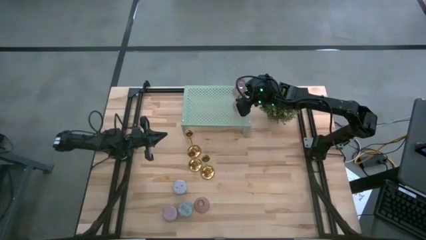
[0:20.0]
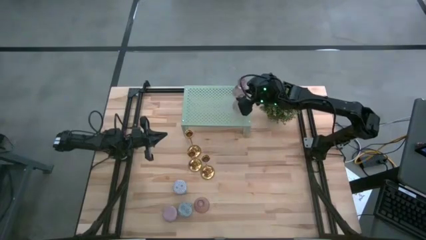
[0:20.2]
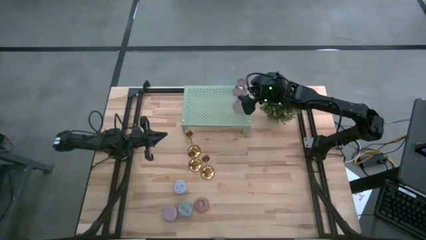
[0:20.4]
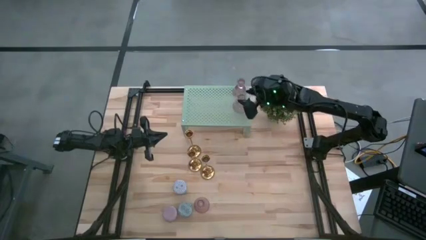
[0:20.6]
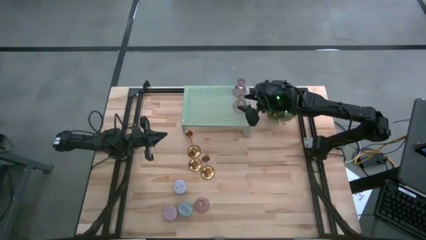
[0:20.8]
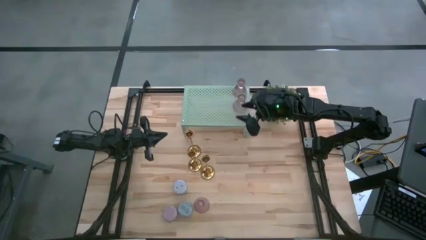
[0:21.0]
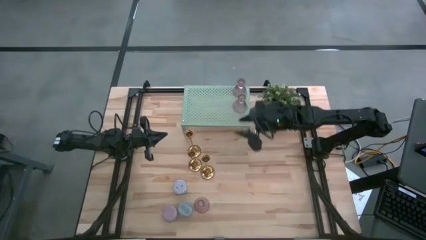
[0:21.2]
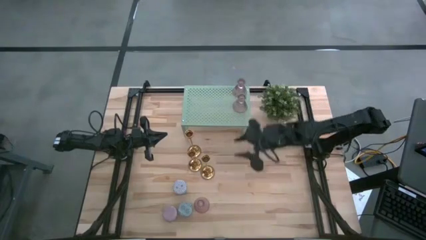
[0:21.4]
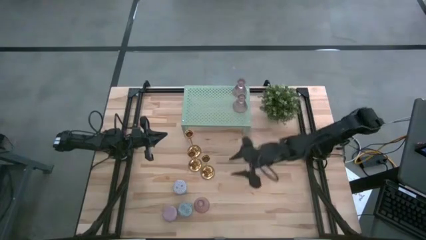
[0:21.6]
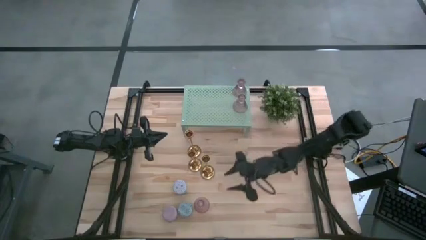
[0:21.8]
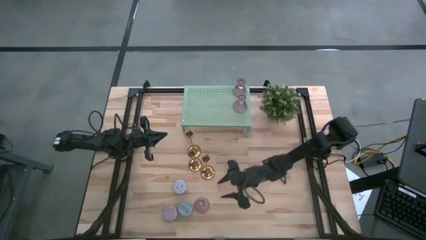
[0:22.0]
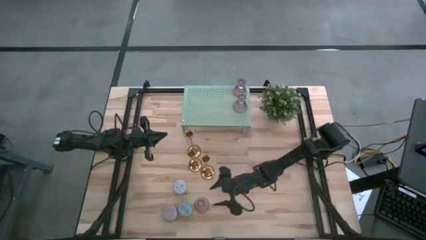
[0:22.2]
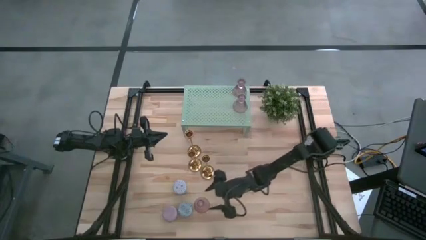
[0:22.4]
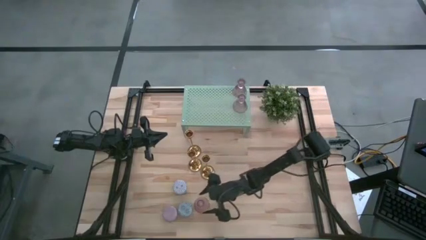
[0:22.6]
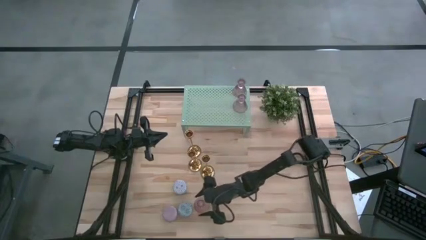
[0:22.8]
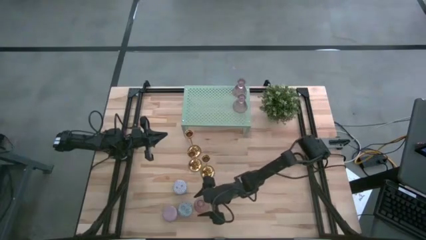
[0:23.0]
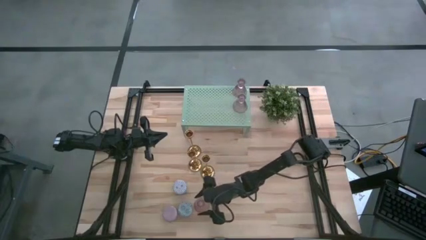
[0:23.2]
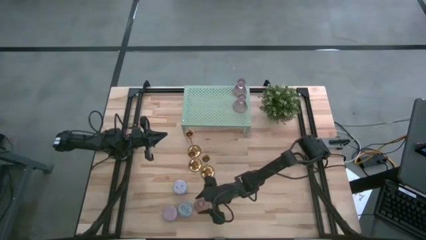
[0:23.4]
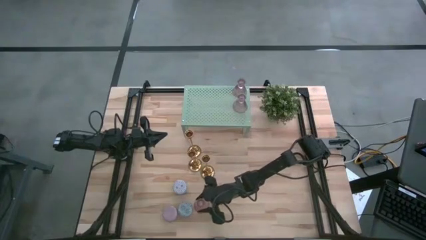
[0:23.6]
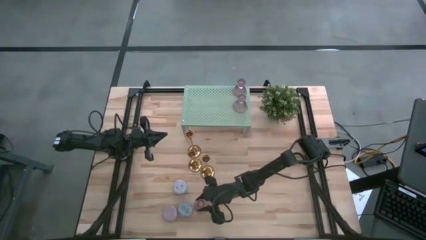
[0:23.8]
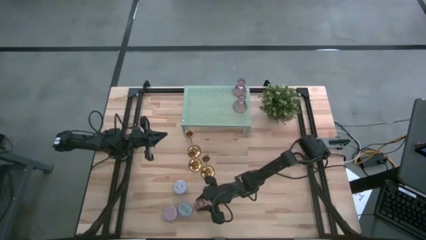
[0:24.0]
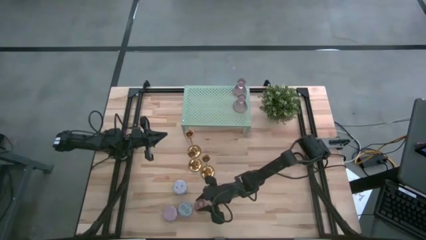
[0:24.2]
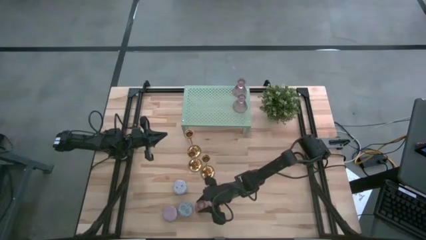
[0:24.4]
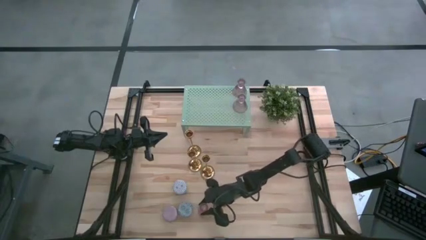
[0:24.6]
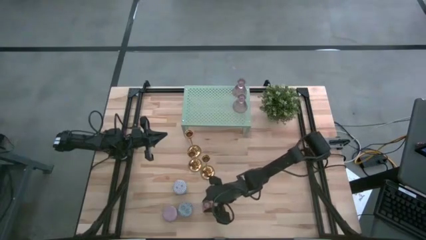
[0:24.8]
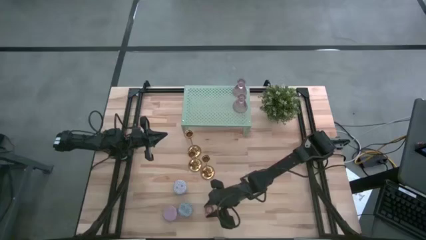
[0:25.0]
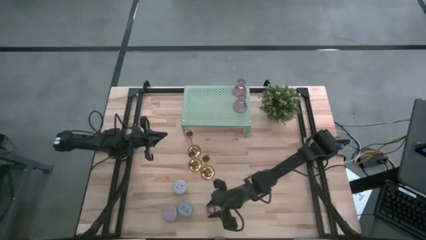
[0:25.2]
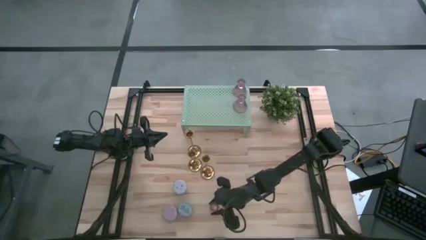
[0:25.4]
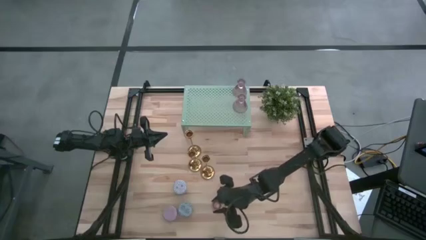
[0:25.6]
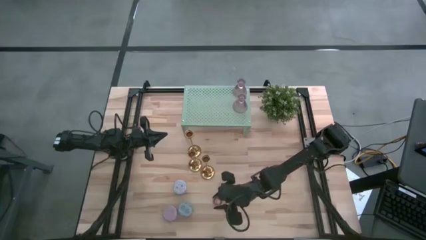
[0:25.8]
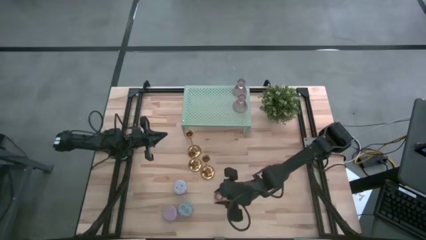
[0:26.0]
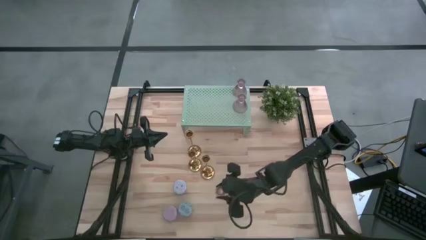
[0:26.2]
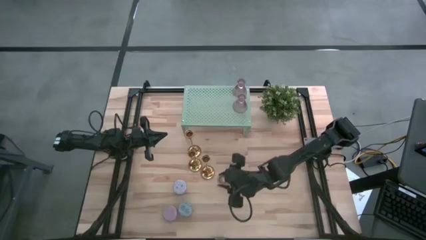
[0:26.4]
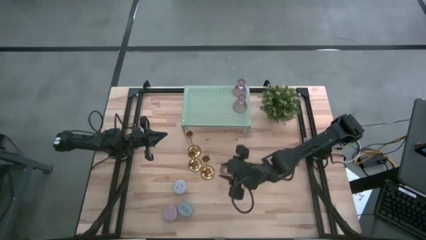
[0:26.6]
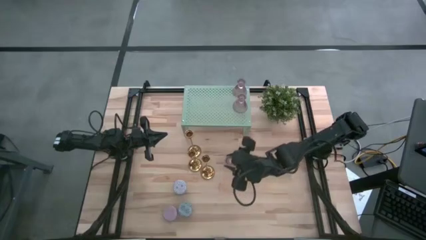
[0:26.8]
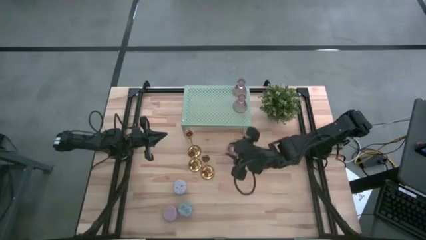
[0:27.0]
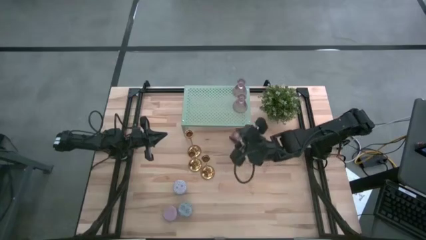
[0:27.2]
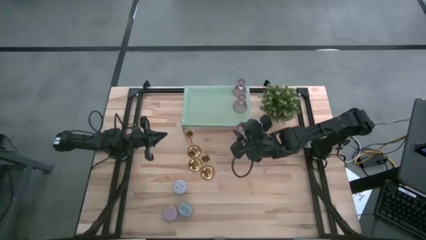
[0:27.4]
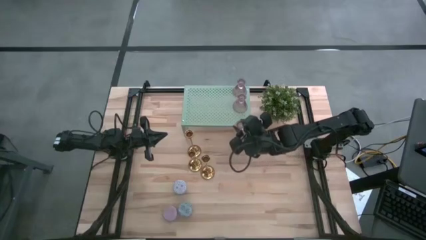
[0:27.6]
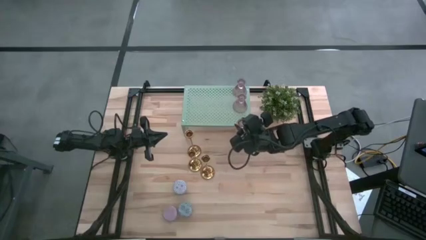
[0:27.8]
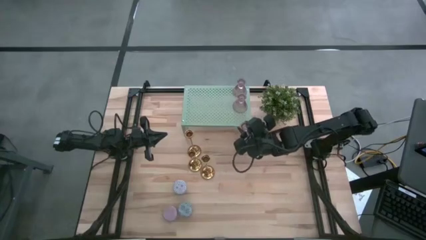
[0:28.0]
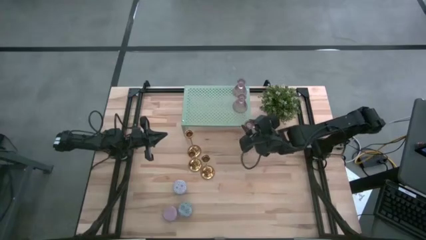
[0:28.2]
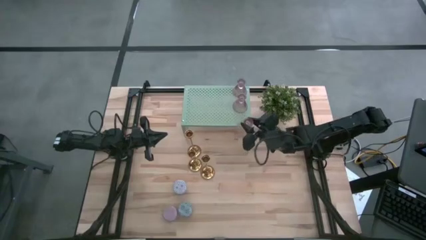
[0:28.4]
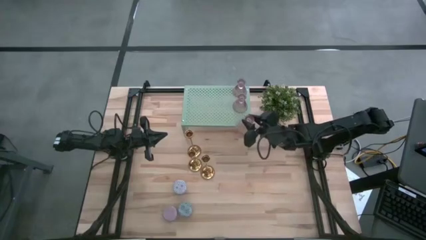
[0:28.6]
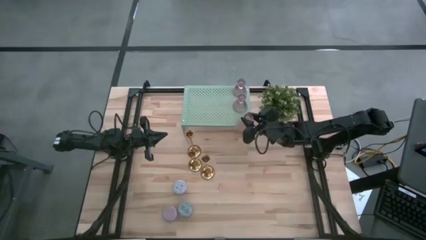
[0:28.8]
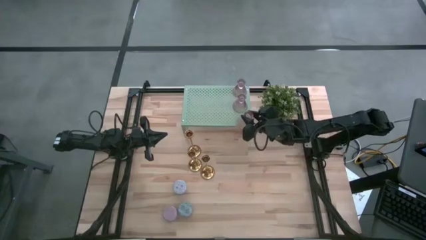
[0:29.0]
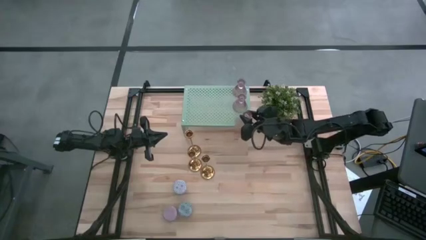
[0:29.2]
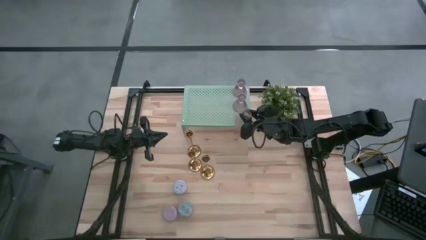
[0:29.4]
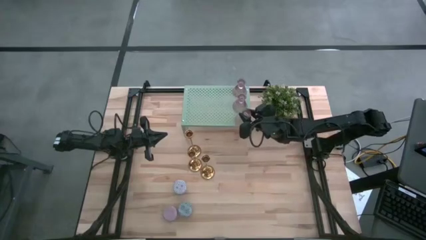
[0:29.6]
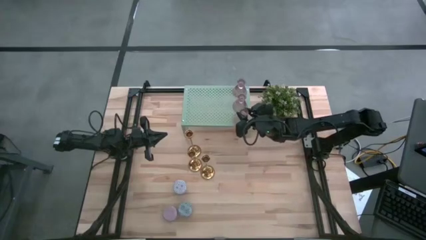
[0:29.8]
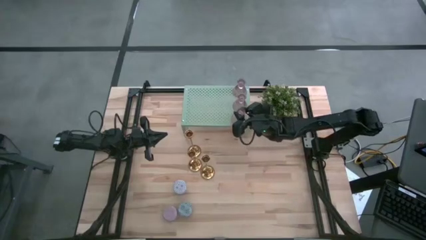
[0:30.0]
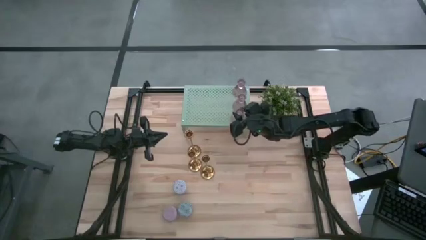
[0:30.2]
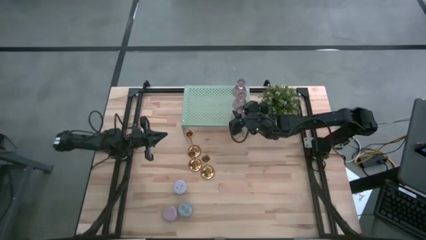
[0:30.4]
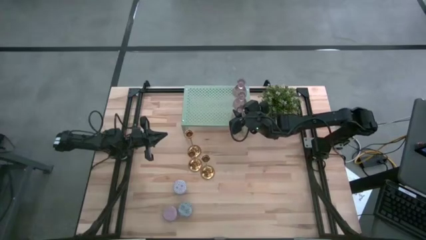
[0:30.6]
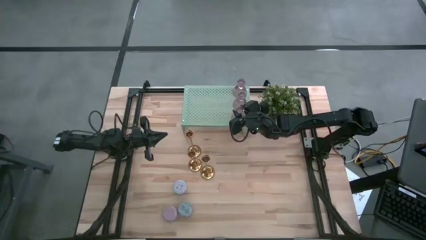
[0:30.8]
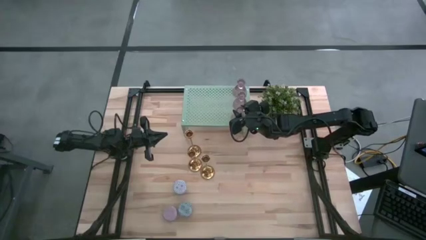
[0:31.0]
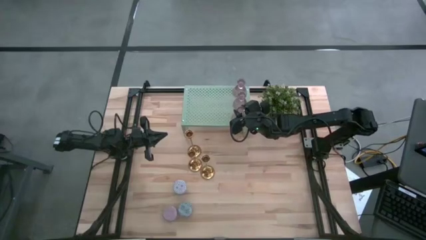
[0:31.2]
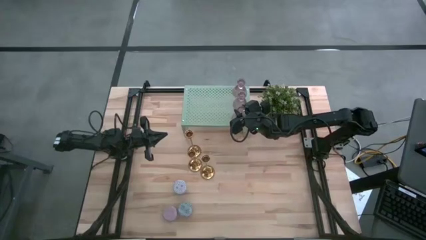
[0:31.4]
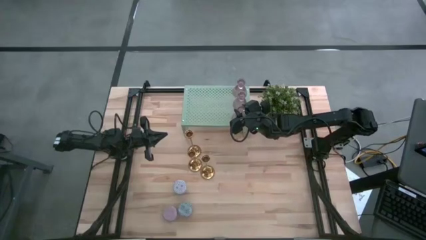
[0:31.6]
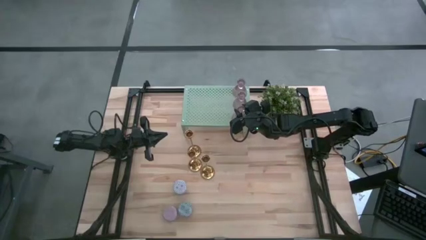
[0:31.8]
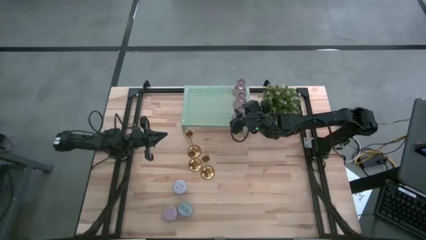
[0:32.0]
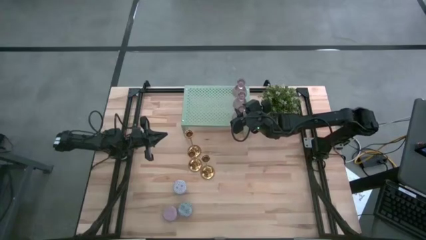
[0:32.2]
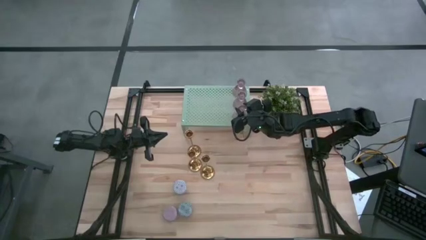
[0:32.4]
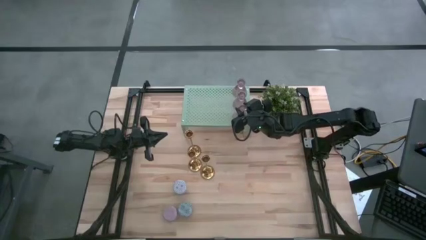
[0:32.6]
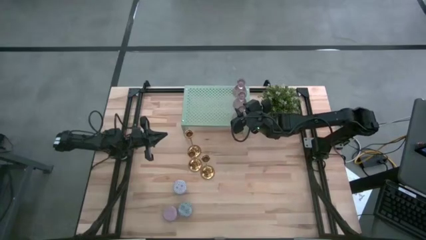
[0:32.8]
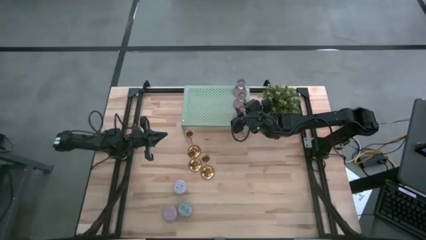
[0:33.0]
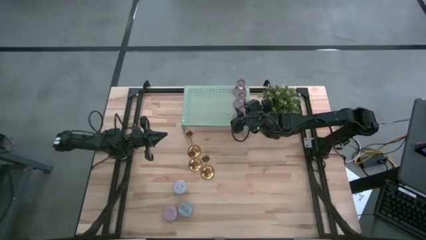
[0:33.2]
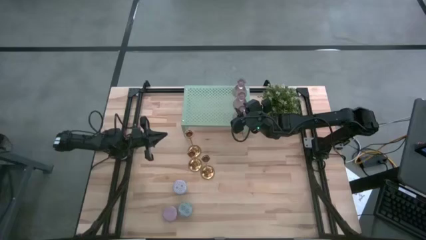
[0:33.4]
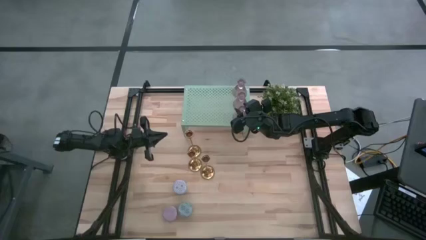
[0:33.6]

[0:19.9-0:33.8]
Task: Pick & Place candle stick holders
Put the light purple glass candle holder on the shelf aligned with the other glass candle holder
